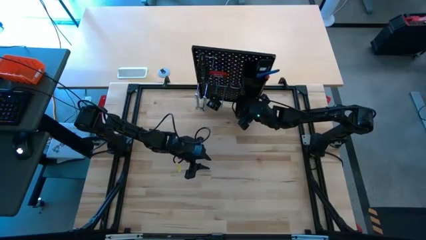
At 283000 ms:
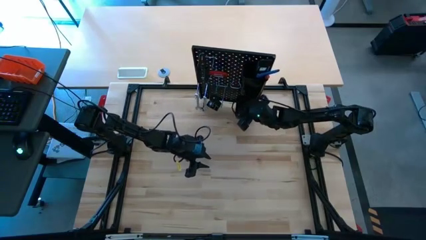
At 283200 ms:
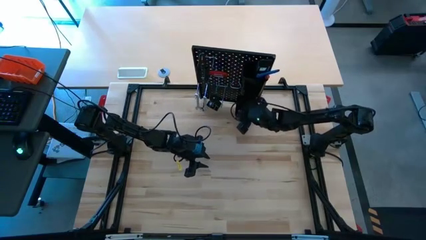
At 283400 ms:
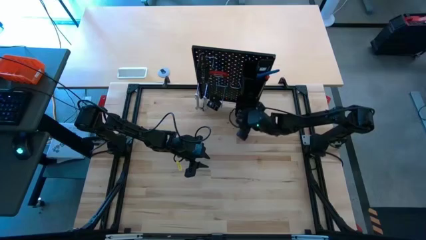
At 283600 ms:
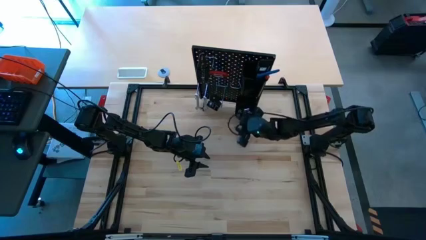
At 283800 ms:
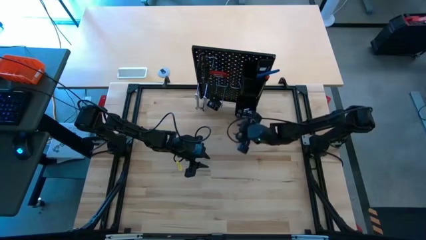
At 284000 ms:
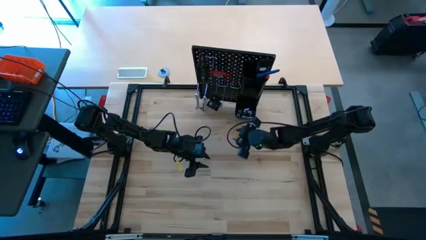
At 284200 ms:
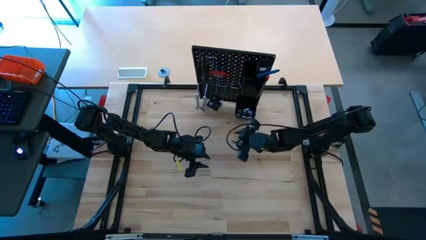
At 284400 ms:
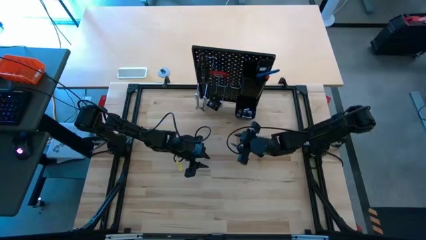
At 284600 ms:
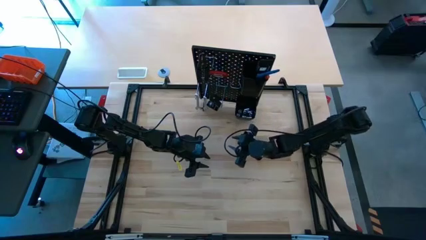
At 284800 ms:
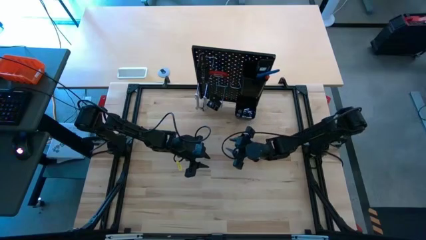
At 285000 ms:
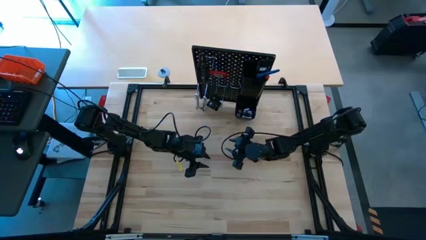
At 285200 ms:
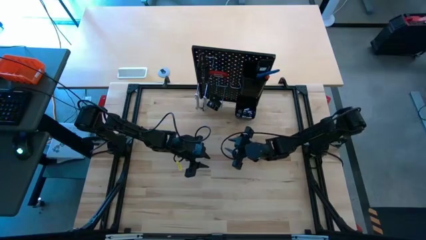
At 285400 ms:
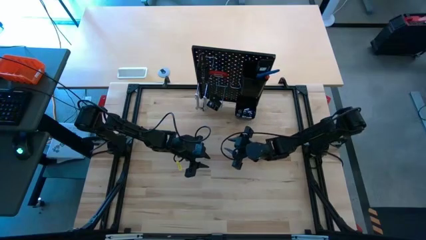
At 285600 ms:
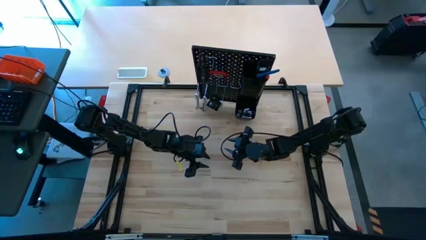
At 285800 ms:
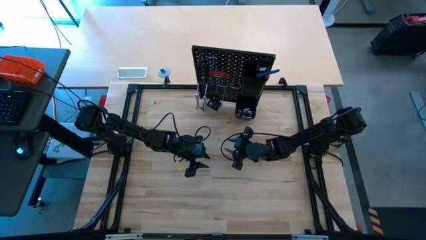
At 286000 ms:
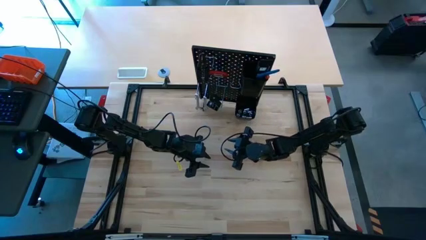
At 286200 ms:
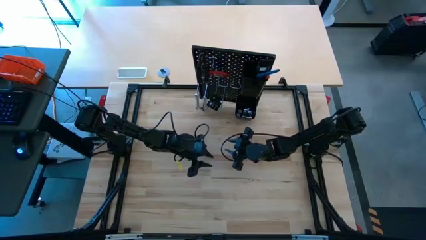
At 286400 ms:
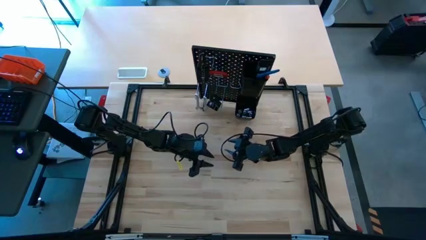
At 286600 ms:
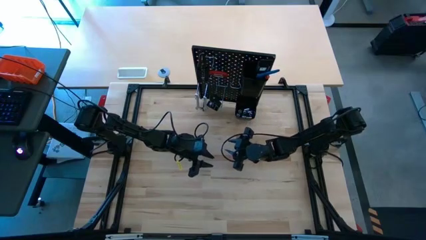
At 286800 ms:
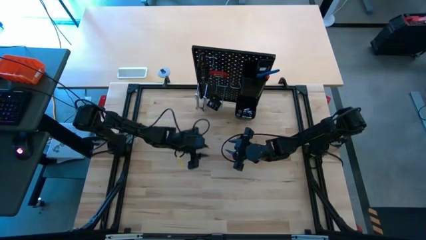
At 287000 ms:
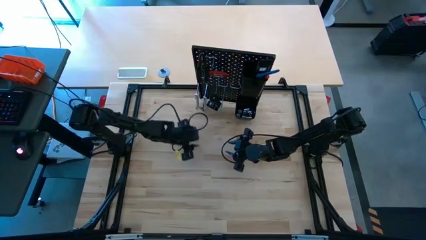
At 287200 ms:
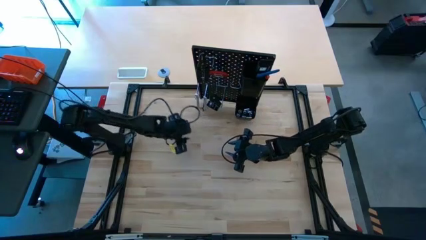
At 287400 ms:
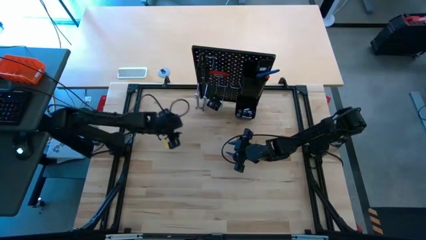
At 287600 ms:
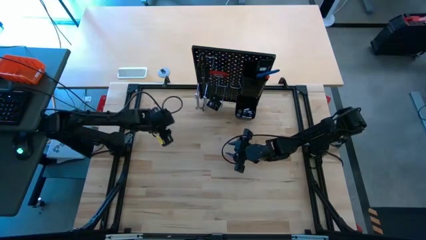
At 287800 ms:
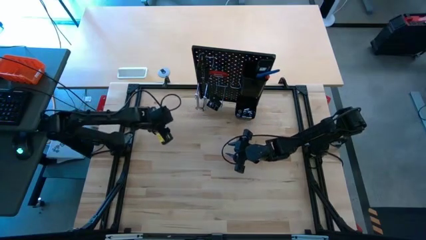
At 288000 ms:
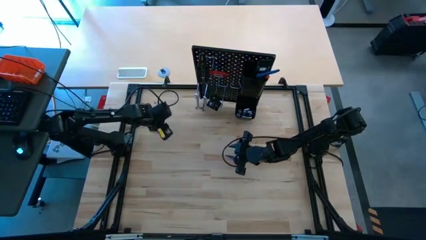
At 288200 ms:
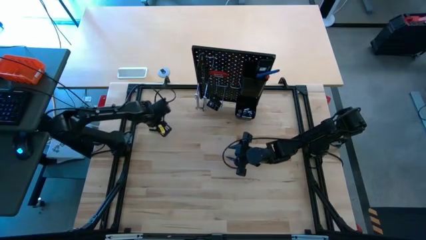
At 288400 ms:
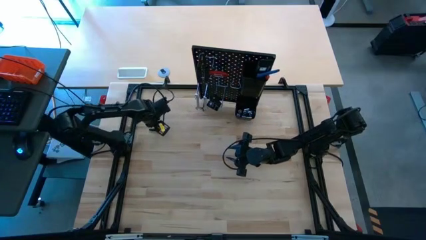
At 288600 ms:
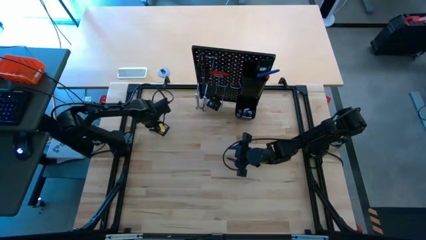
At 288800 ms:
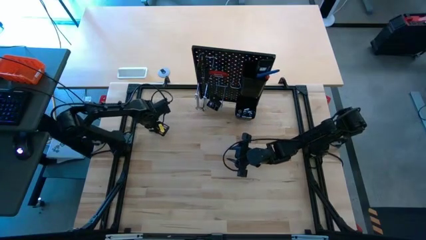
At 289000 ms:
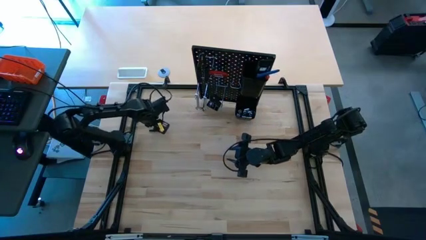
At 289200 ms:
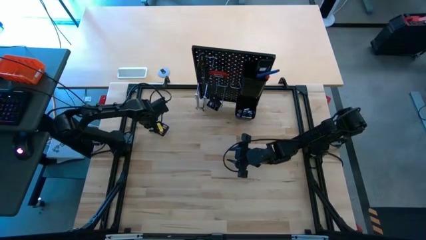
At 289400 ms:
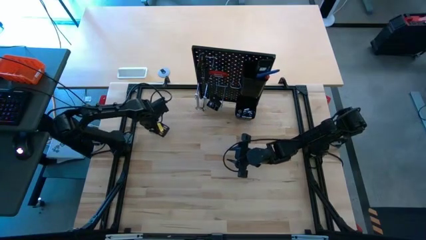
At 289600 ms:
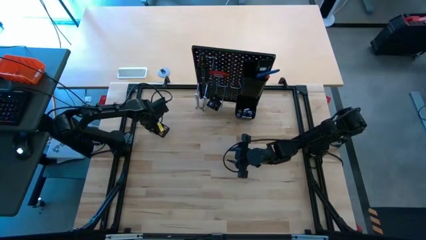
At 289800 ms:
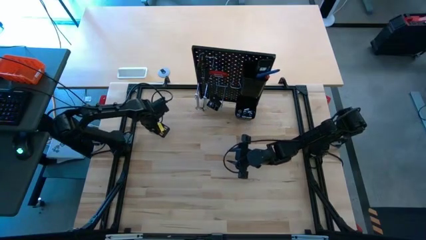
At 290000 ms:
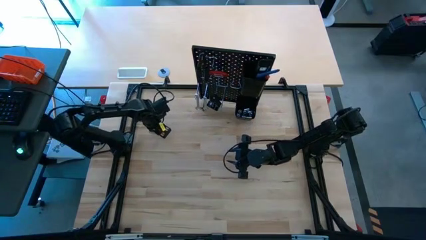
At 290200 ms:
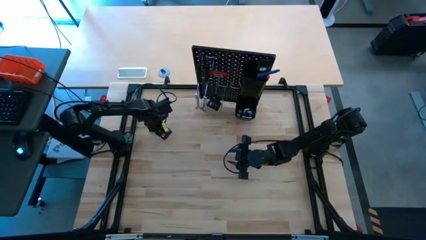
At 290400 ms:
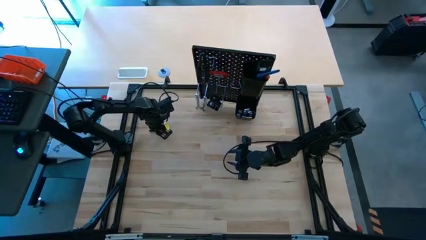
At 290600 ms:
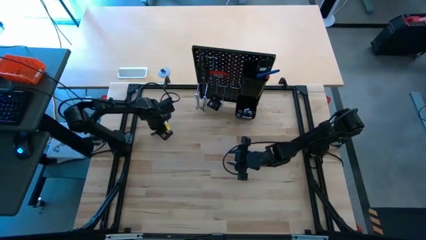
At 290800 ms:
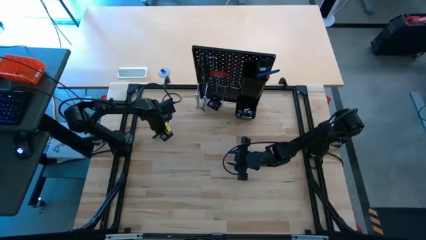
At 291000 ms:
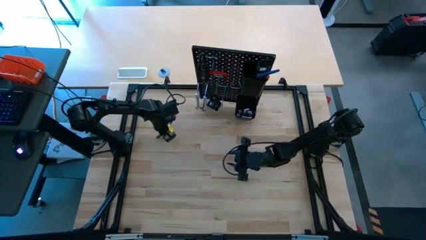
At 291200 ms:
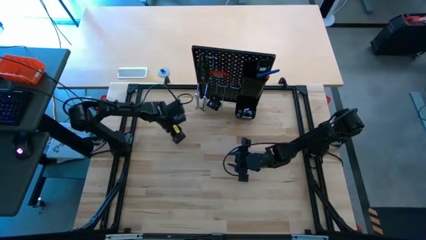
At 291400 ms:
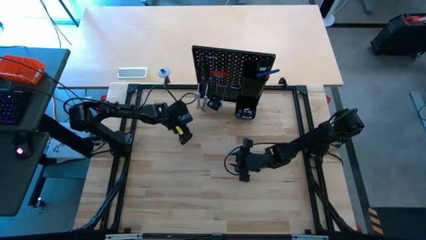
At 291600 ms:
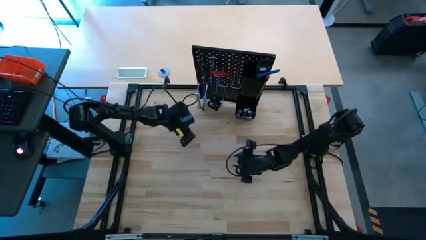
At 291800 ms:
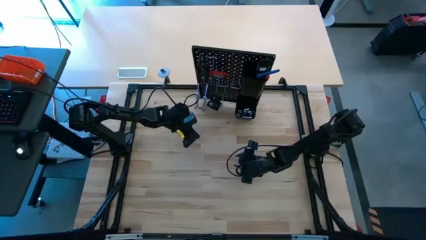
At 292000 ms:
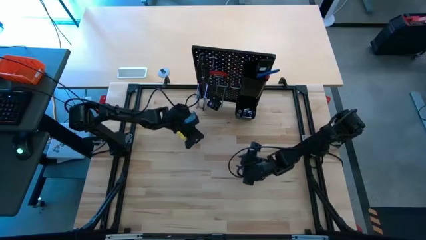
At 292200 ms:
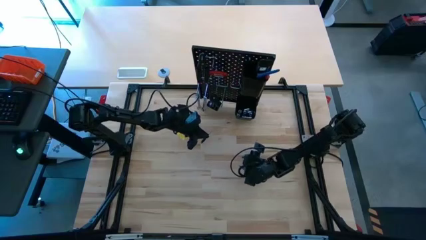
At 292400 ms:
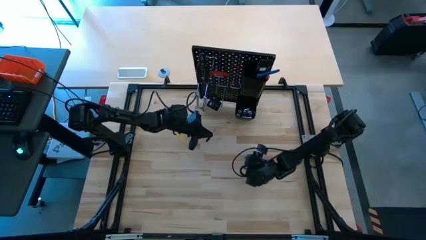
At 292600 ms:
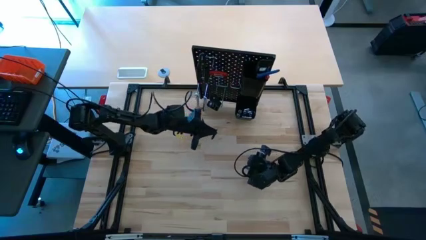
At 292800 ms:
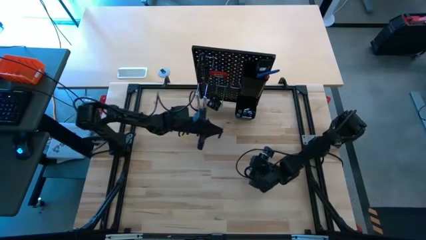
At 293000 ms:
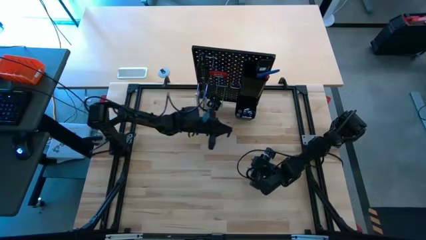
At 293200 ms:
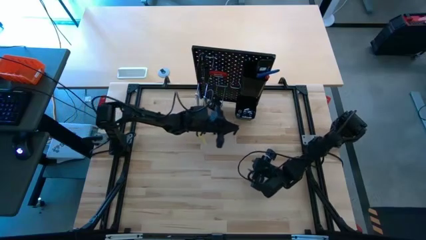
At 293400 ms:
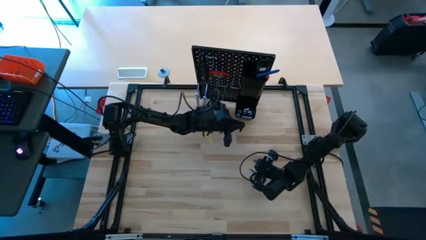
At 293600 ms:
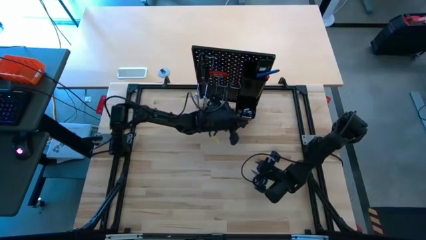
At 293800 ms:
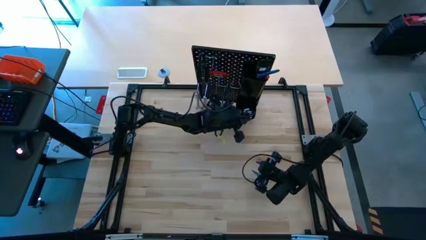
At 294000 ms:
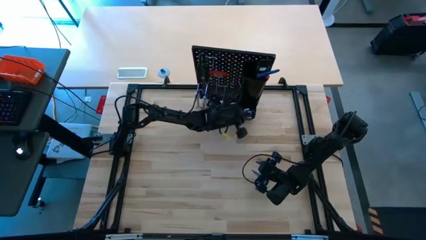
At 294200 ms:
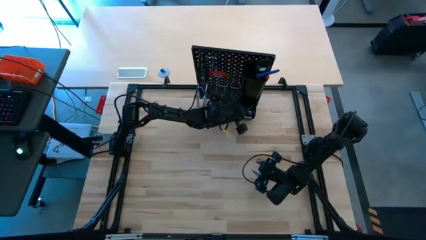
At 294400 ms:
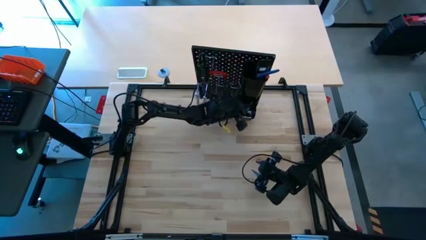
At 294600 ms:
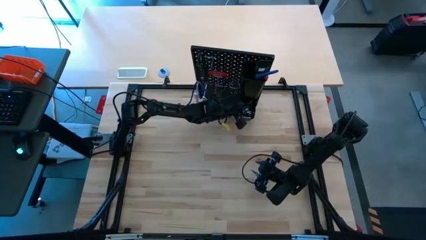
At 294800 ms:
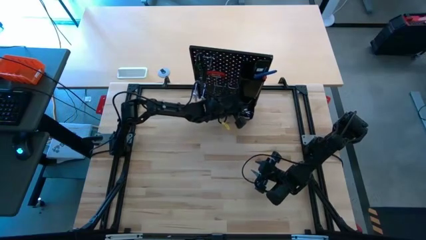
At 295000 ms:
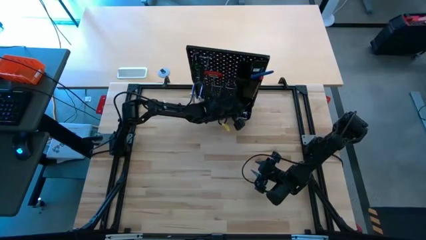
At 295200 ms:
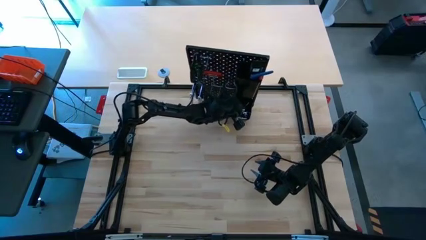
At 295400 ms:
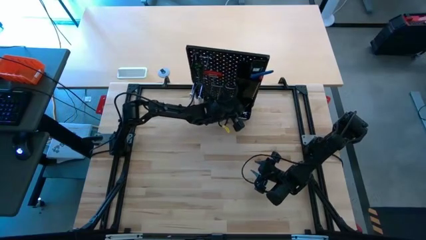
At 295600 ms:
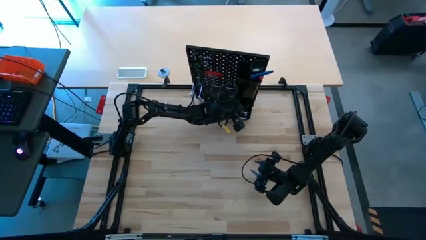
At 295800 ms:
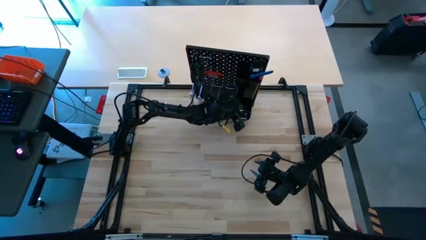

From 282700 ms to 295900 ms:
Task: Hang tools onto peg board
Put the screwdriver into the bottom black bin on the peg board

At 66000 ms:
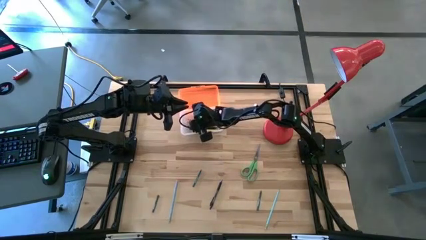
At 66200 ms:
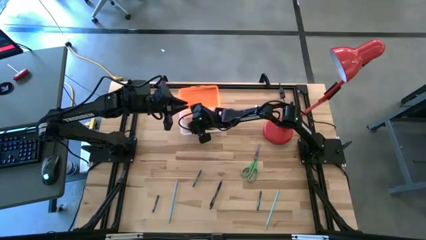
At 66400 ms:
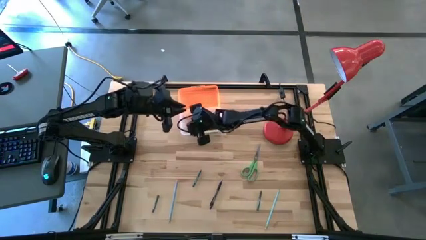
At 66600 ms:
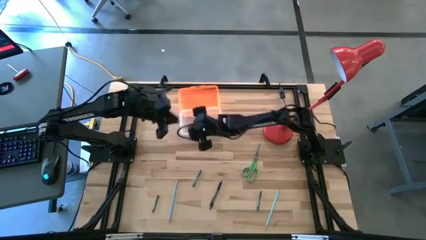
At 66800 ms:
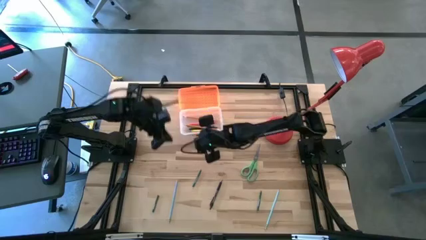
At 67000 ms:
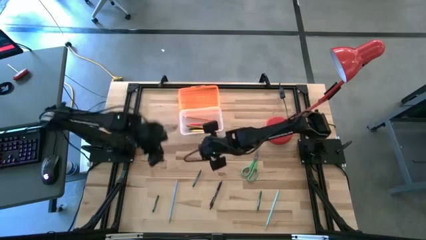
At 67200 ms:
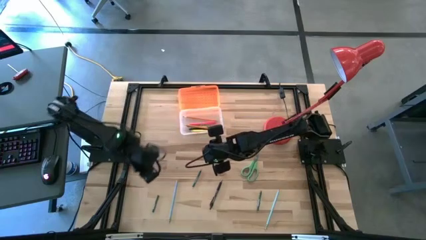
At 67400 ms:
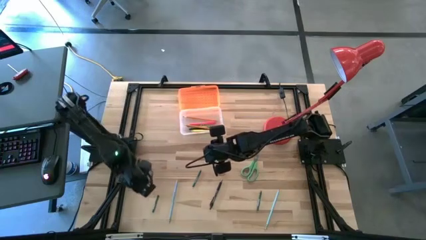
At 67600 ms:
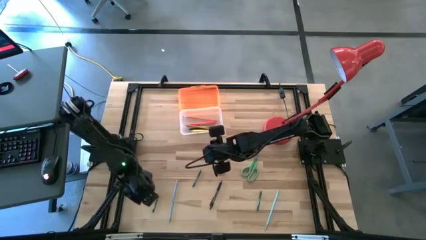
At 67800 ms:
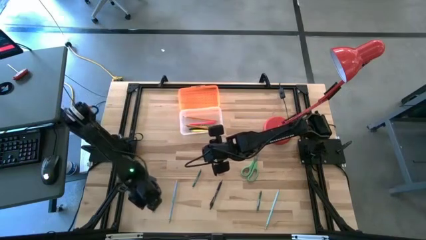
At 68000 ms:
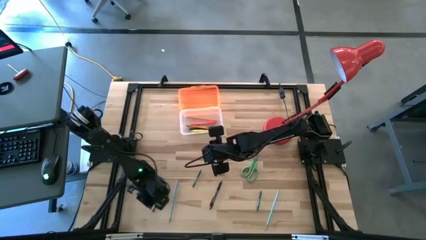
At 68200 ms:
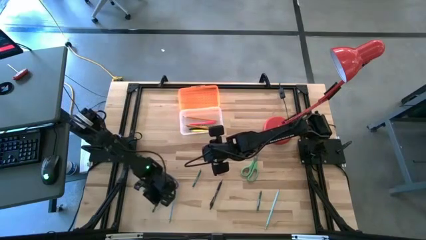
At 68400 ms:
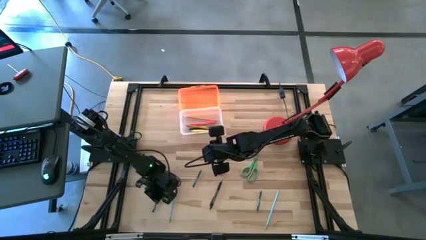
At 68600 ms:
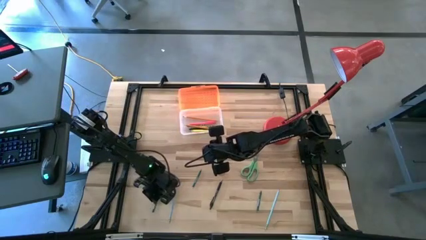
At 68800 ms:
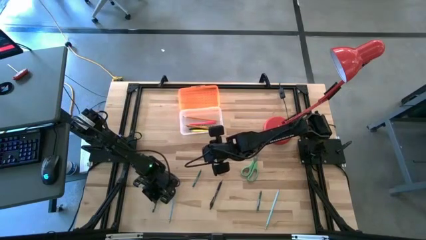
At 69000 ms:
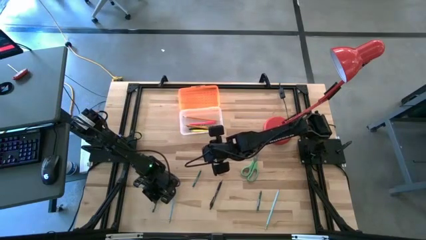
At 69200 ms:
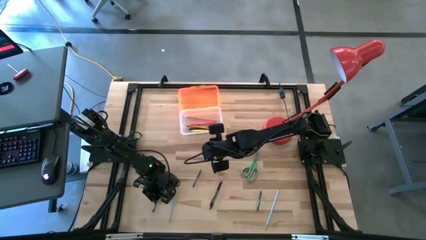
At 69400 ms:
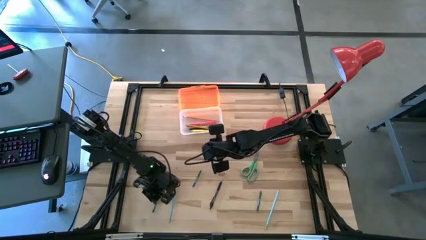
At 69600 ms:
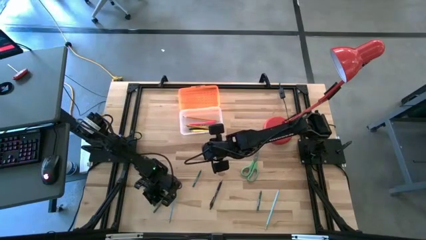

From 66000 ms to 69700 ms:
Task: Pick & place school supplies into a supply box
Put the left dark green crayon into the orange supply box
